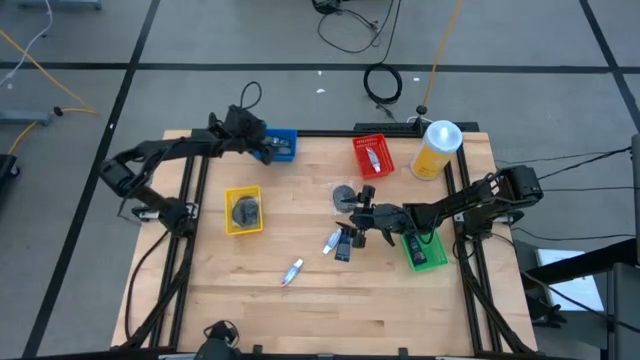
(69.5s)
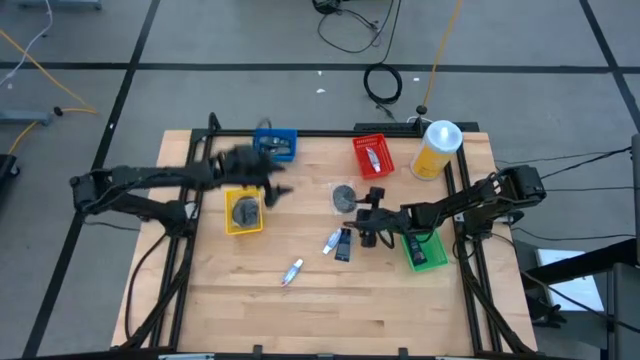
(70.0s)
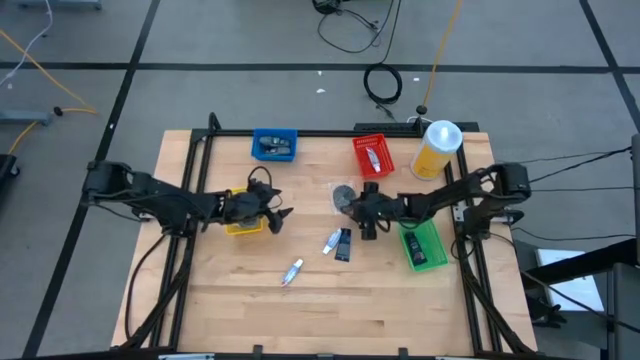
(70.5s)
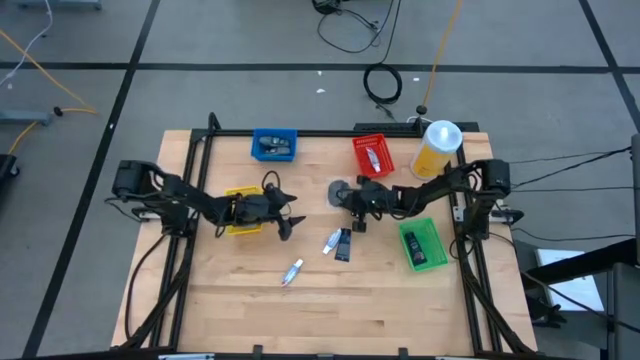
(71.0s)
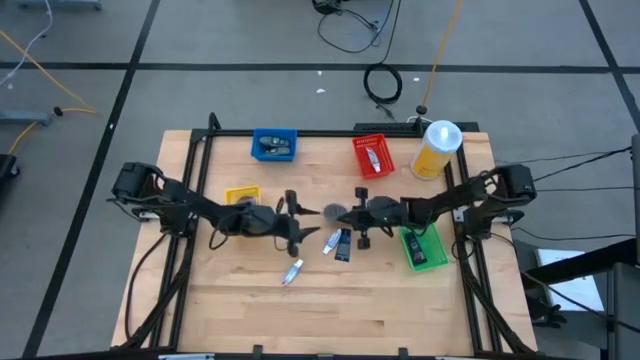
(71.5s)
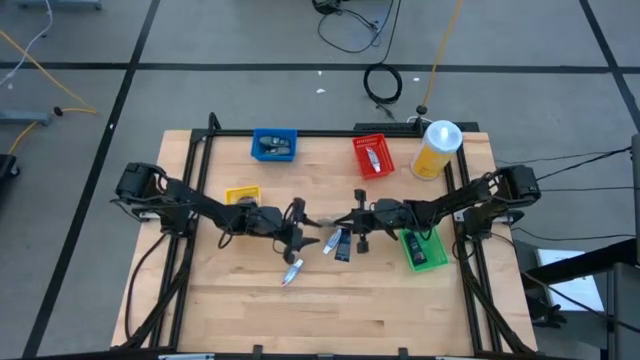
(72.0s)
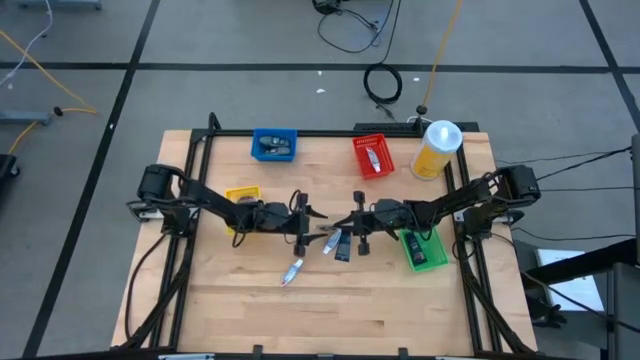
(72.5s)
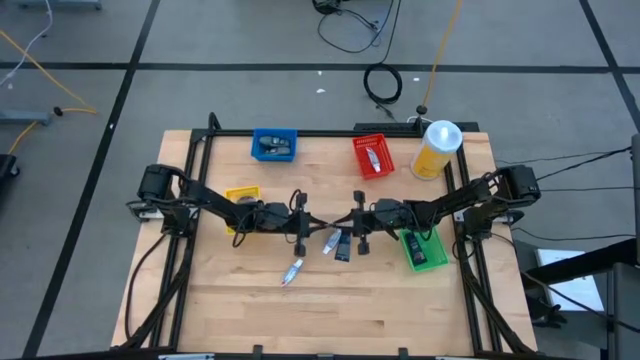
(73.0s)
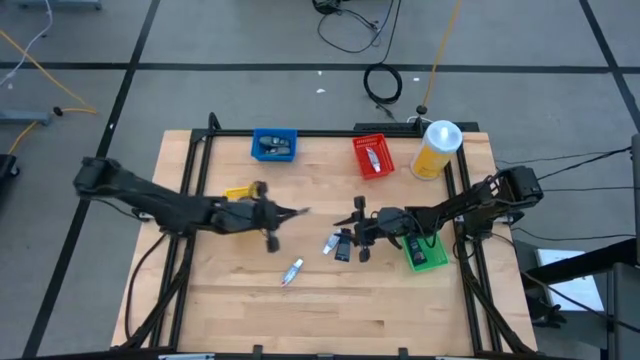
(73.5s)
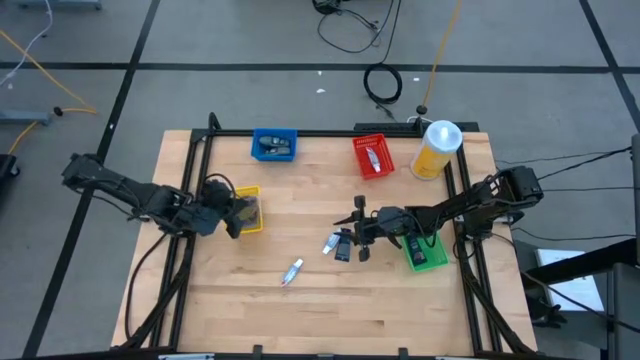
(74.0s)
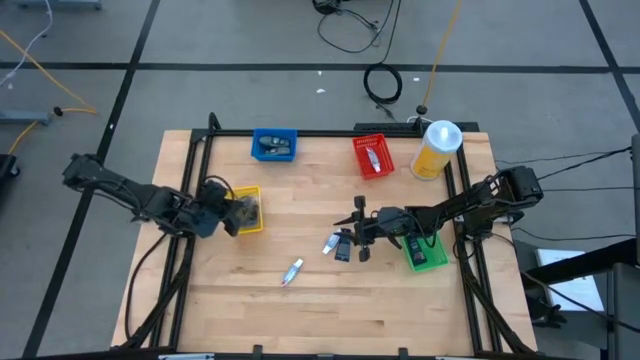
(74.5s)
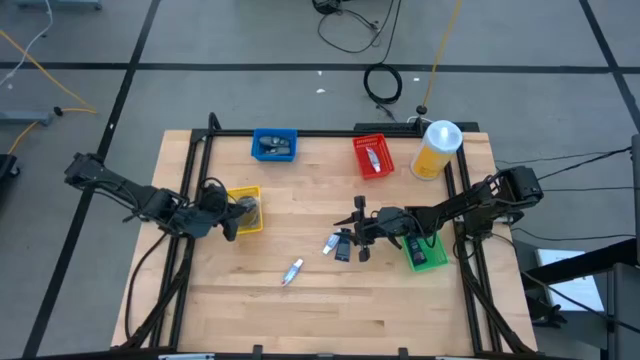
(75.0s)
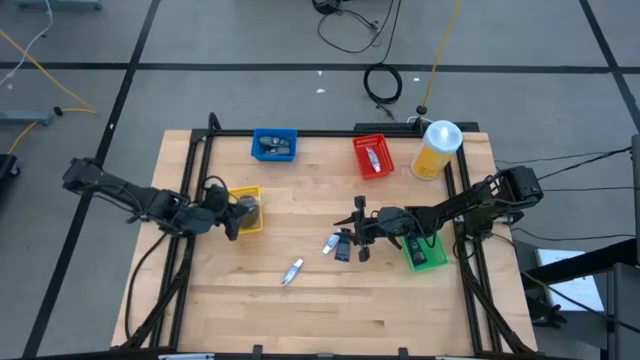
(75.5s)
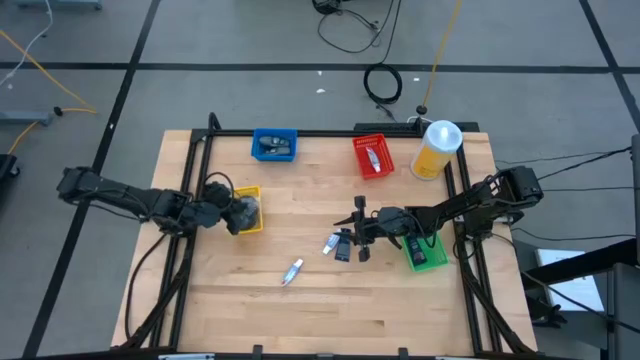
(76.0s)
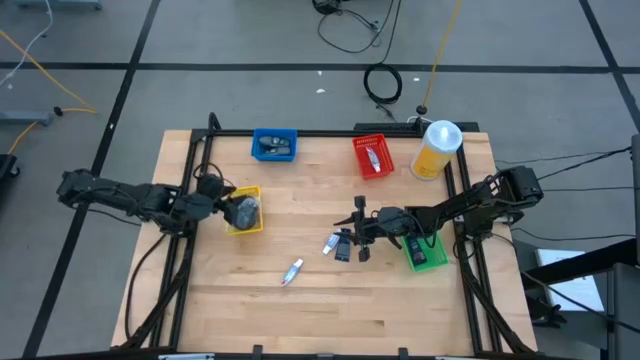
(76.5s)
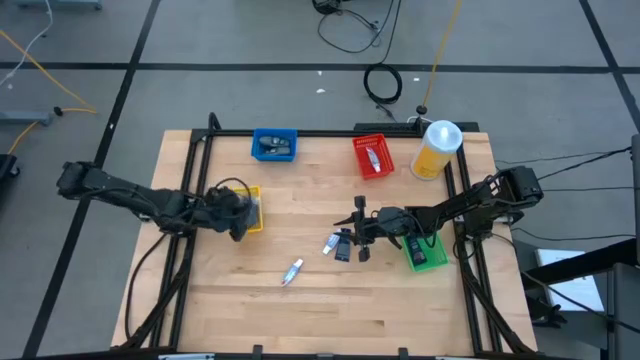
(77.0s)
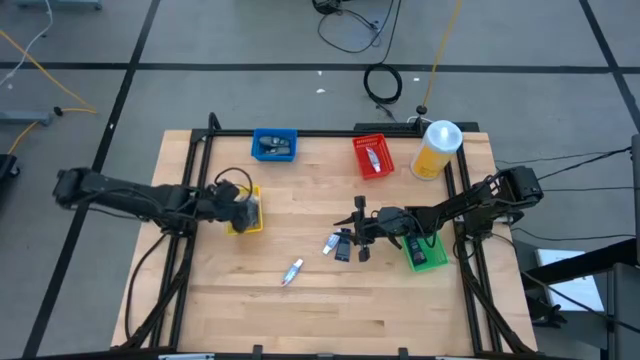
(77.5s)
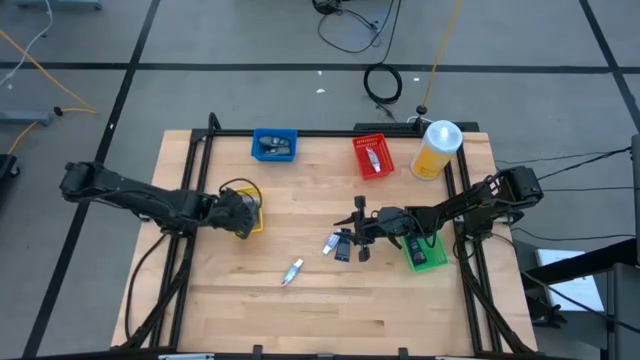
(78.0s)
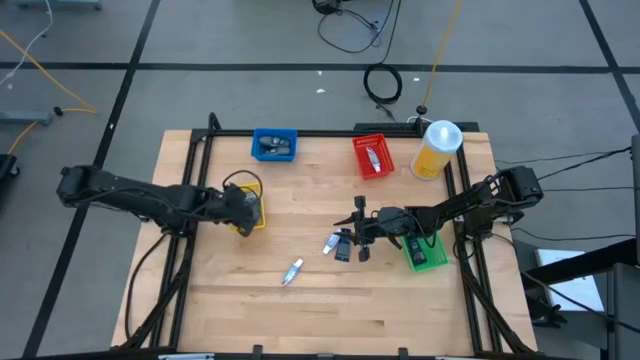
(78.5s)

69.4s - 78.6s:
Task: Pick & Place Travel size toiletries
Put the black hairbrush into the yellow bin

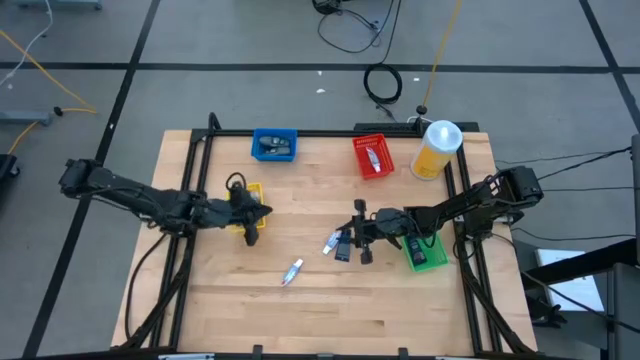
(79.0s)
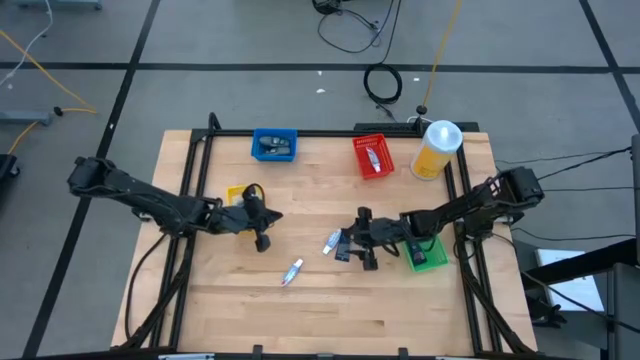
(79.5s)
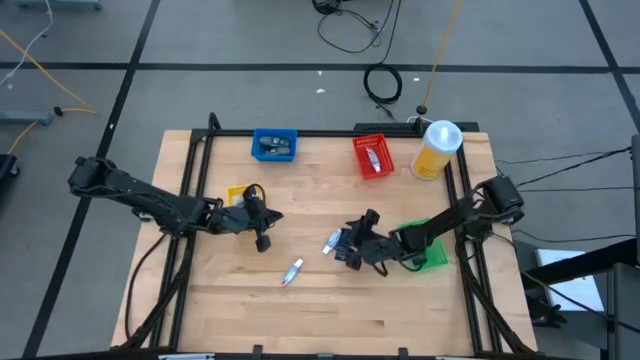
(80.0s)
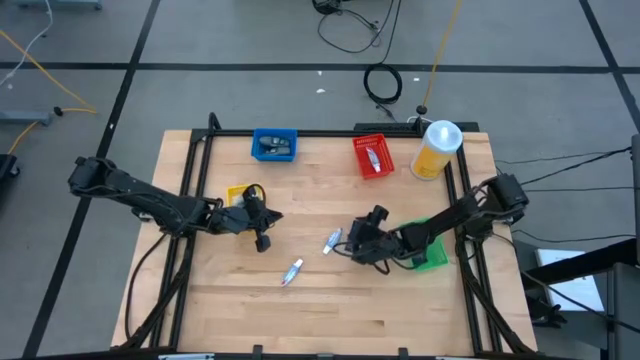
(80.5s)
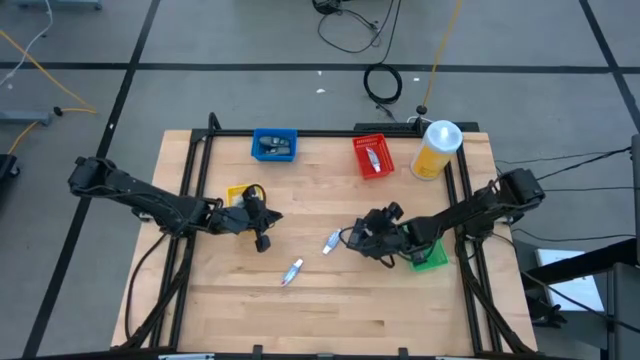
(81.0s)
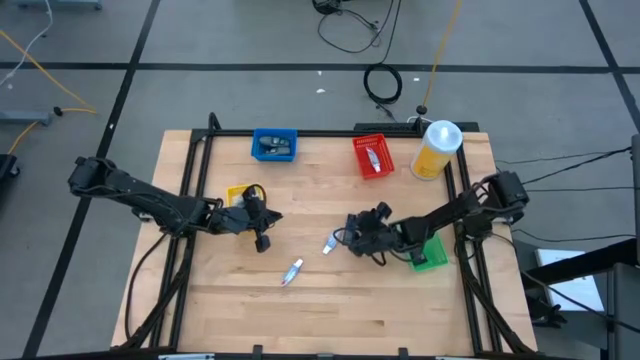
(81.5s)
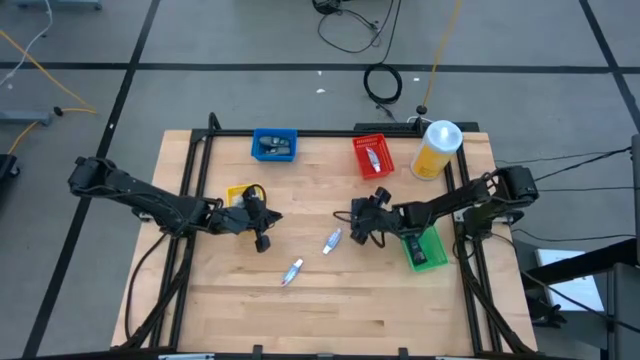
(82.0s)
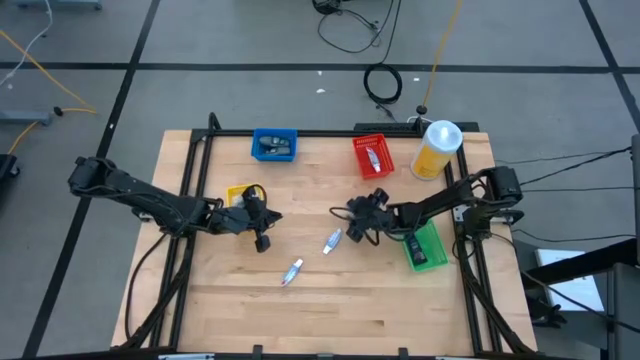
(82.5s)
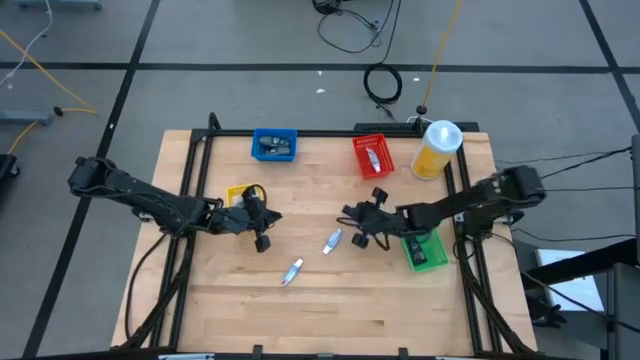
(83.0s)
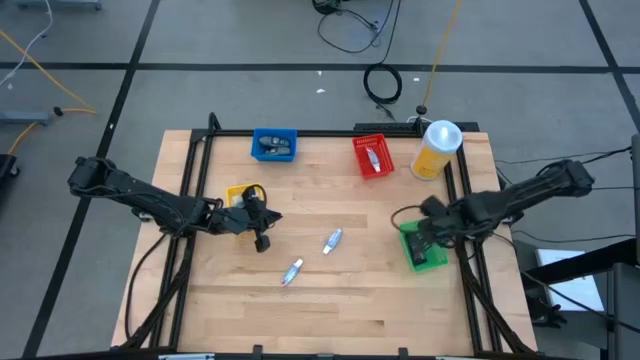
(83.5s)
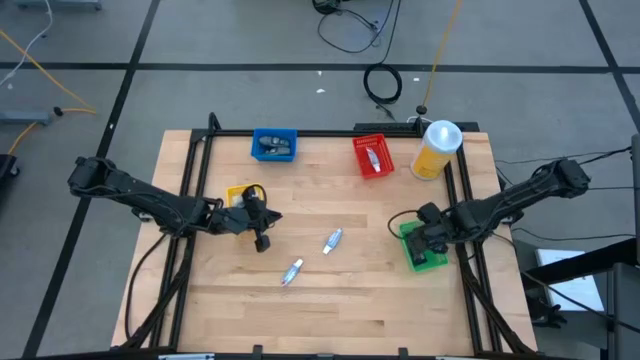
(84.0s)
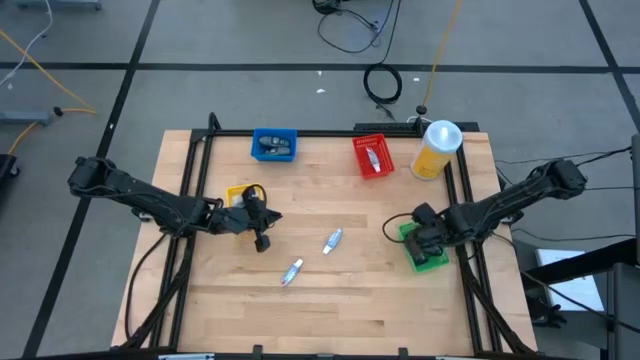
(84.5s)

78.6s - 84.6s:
Put the blue shave cream into the green bin

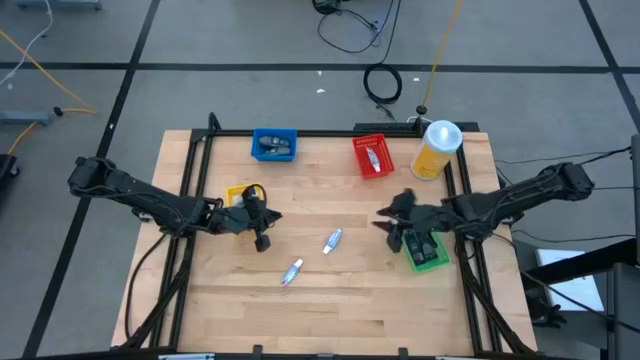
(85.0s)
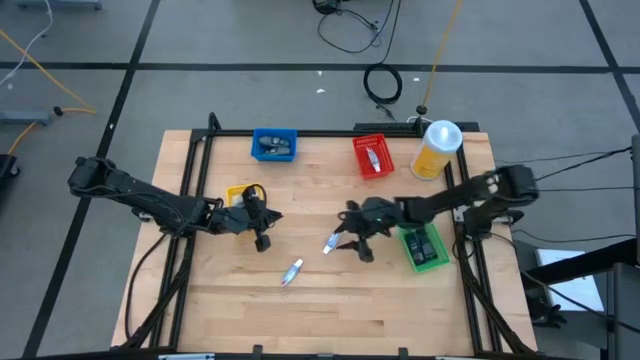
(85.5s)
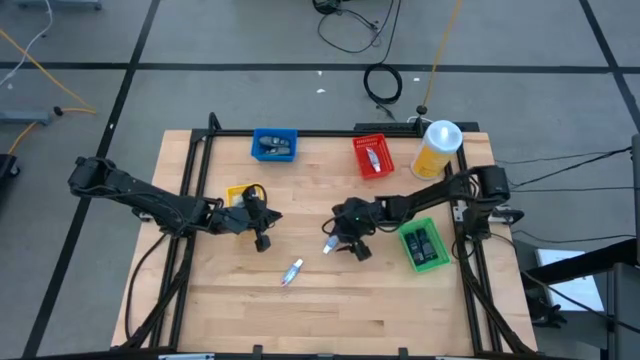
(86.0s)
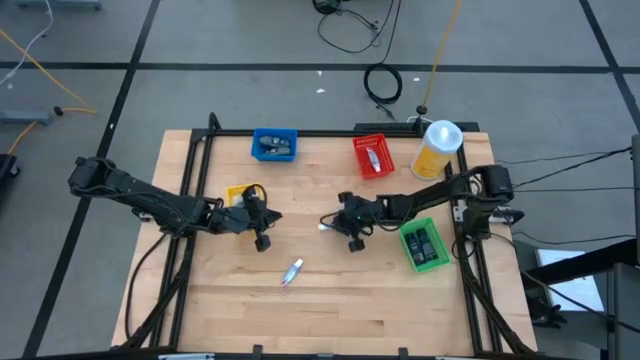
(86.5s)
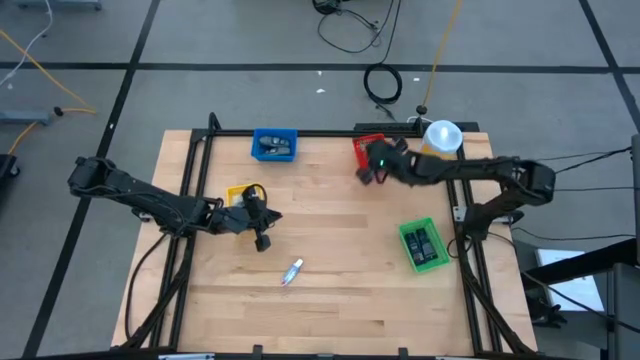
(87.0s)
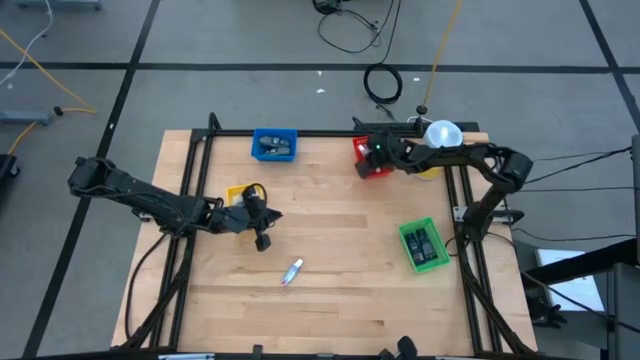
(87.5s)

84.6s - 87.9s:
Put the white toothpaste into the red bin

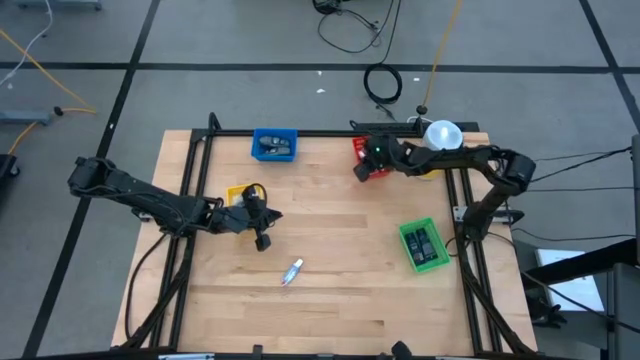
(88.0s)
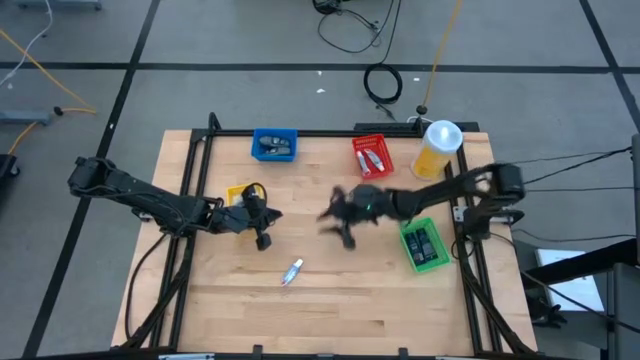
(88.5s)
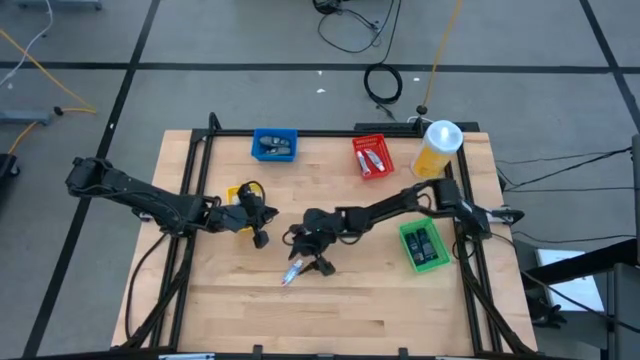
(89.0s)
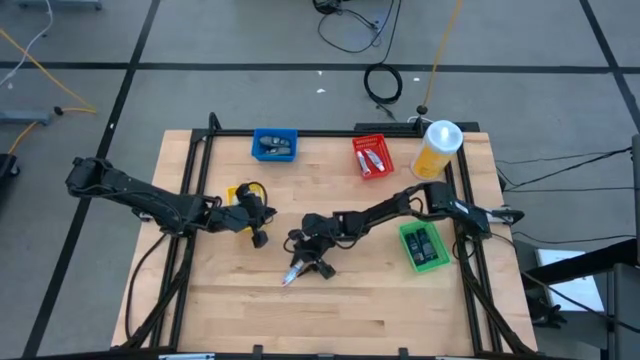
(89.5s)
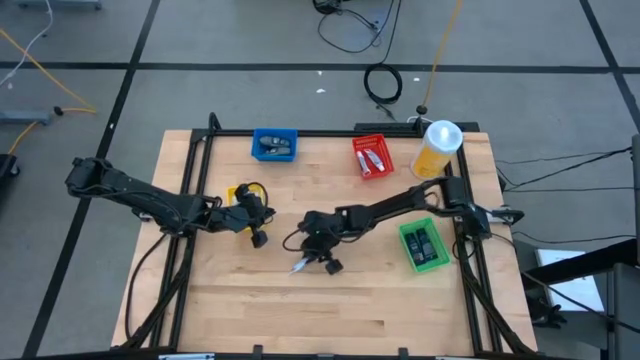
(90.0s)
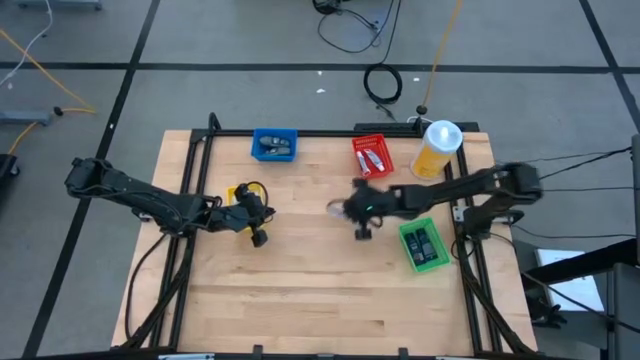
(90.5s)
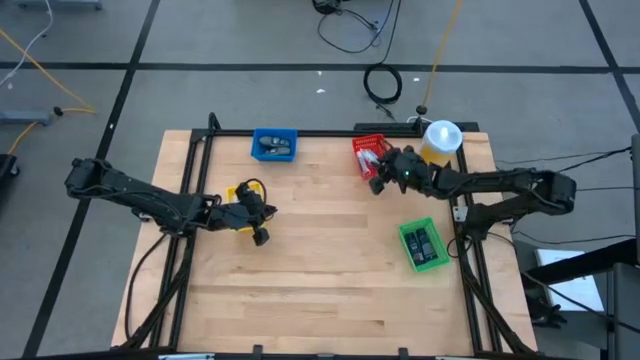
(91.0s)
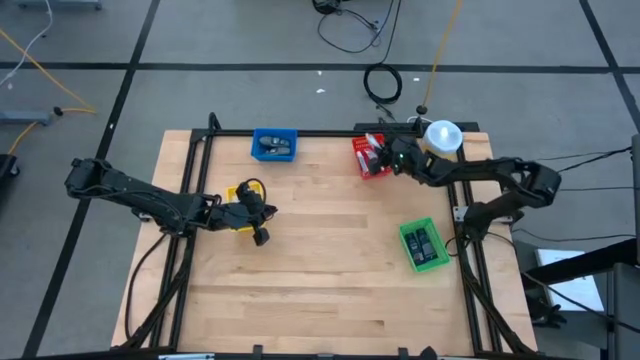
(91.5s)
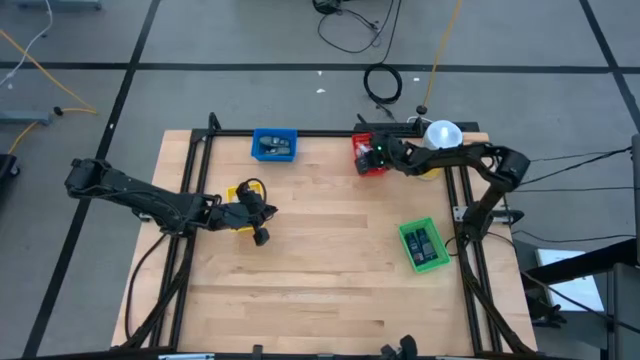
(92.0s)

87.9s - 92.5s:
Put the white toothpaste into the red bin

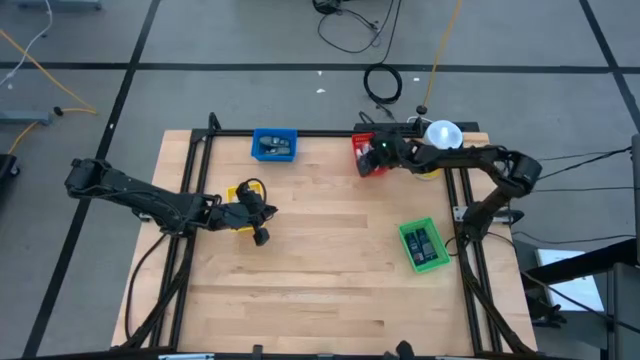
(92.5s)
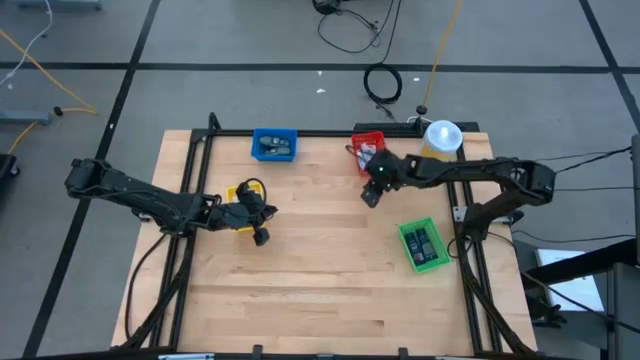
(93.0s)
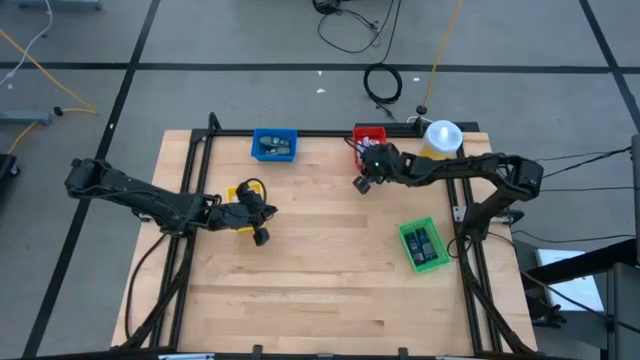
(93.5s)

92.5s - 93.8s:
Adjust the red bin on the table
